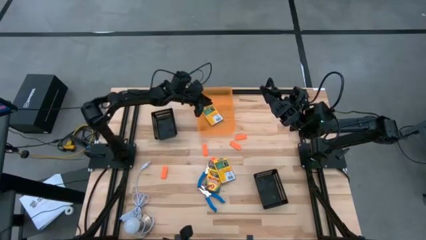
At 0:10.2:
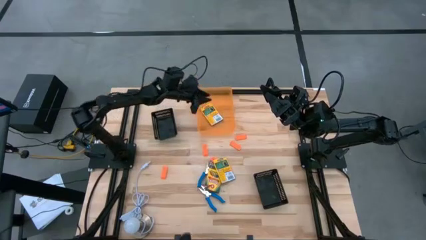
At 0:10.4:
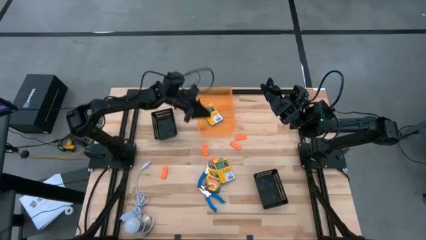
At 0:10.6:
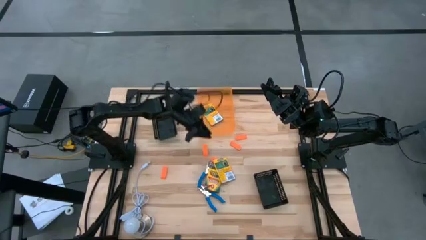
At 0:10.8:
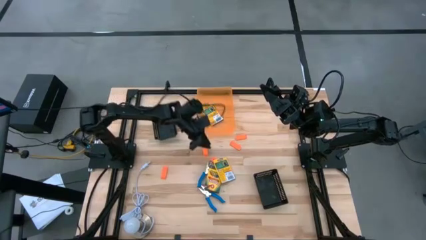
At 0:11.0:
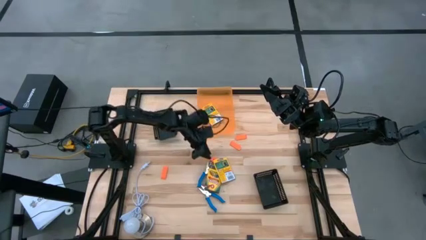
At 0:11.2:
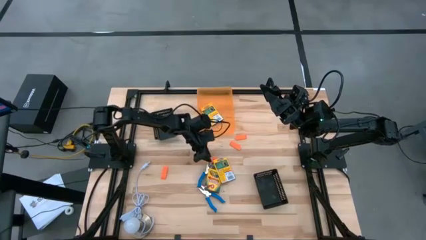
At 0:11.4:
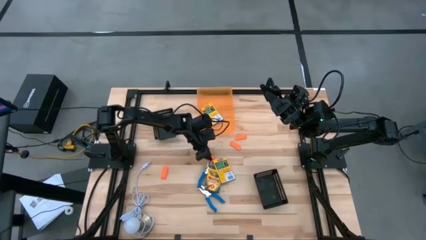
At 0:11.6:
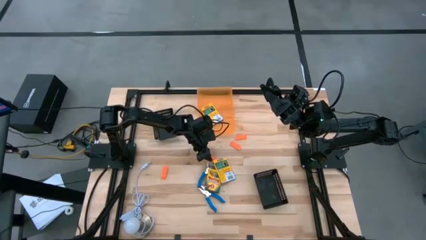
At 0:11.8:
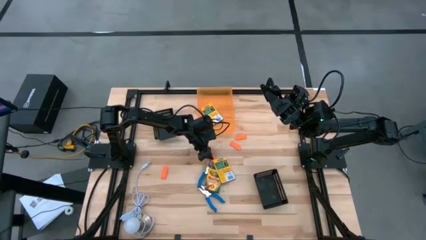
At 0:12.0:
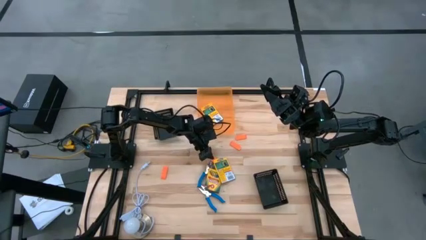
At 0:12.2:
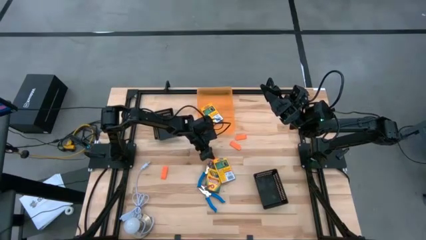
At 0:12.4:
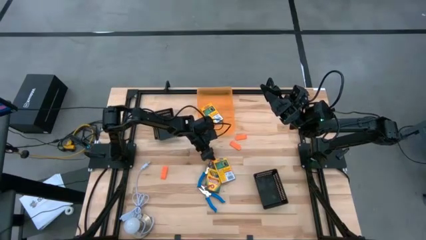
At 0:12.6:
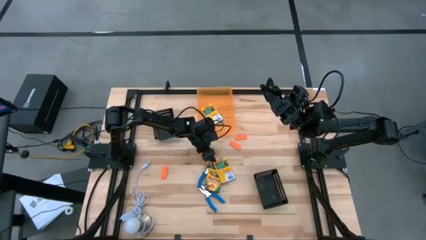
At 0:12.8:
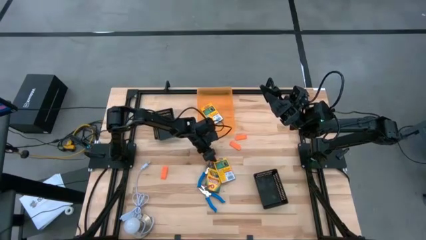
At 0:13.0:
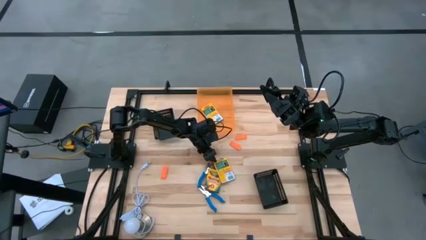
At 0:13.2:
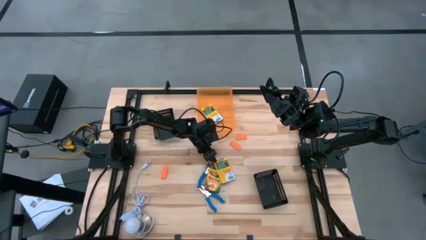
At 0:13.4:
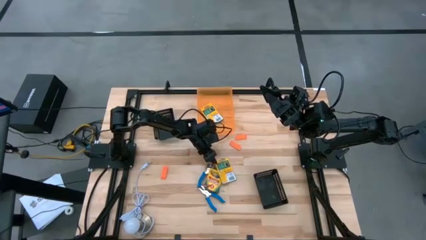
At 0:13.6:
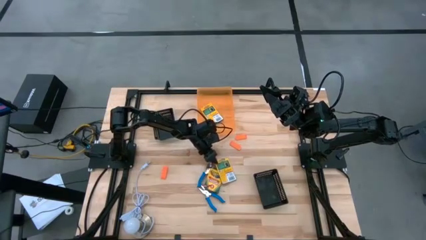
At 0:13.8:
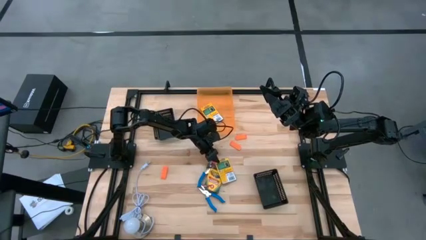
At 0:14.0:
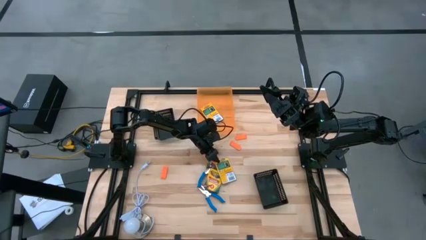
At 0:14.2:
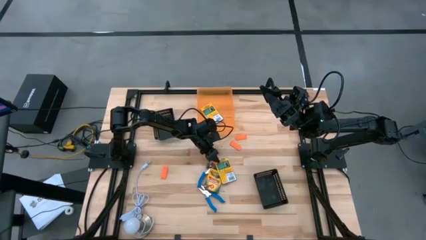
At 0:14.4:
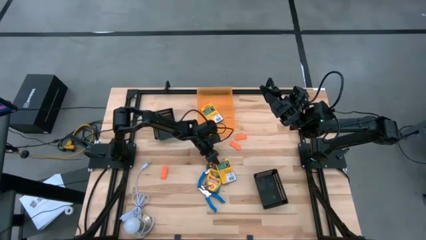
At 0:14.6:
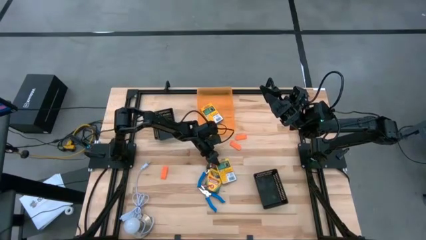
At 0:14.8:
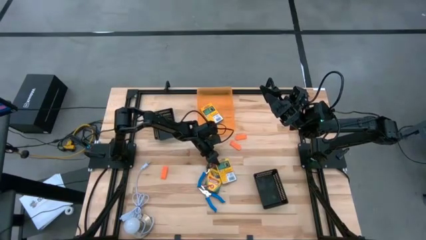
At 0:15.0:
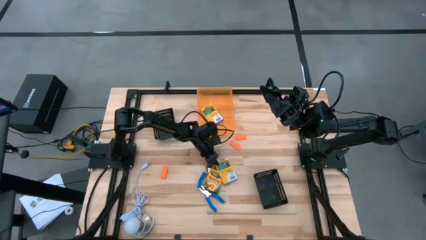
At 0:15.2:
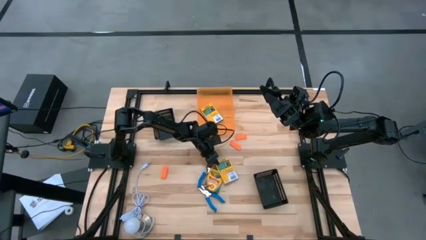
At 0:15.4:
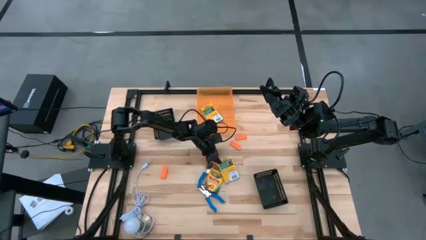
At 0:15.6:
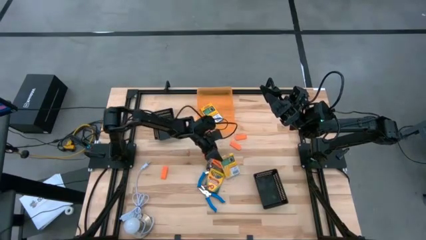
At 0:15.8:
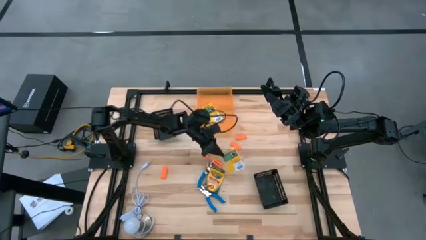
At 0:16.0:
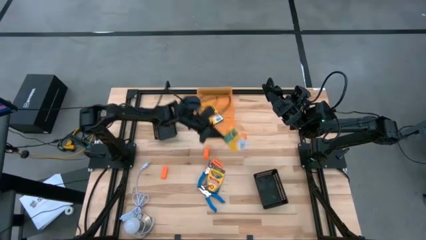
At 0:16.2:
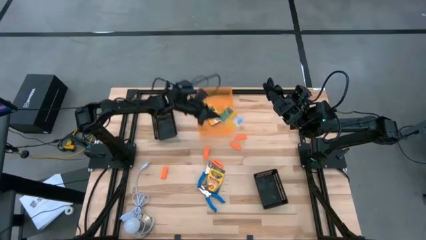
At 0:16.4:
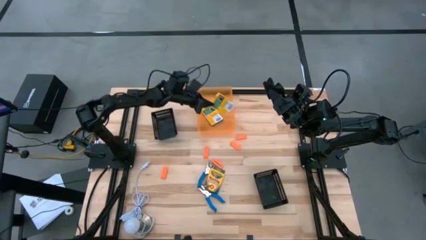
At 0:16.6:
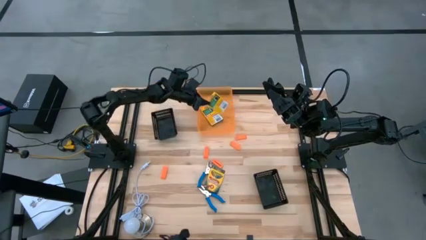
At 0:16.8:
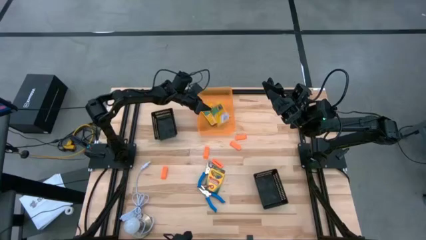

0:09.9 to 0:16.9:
Task: Pick & Place School Supplies
Put the top yellow crayon box into the orange bin

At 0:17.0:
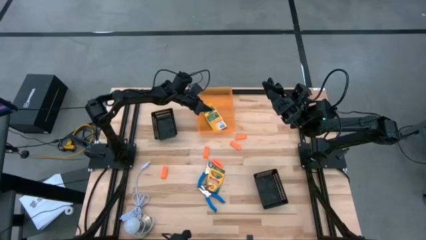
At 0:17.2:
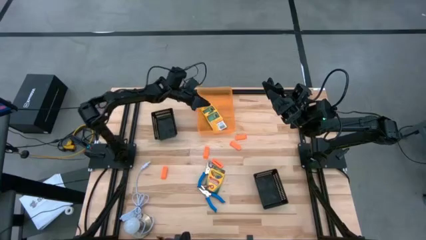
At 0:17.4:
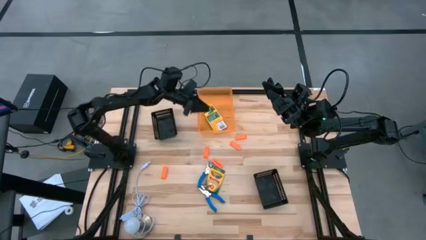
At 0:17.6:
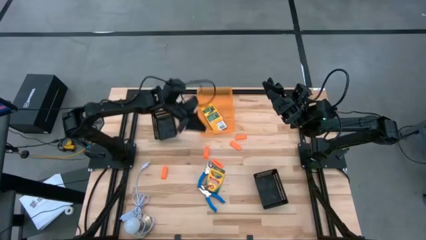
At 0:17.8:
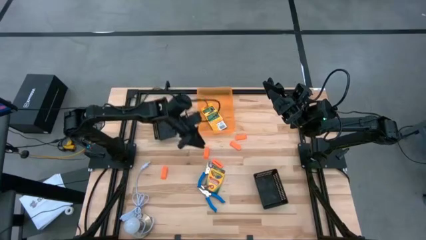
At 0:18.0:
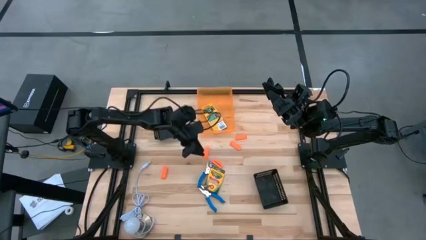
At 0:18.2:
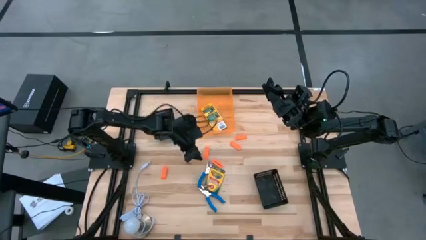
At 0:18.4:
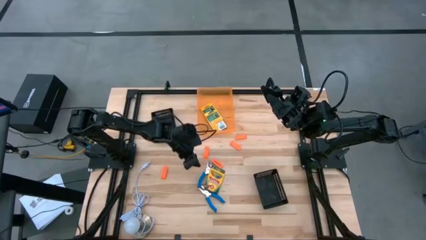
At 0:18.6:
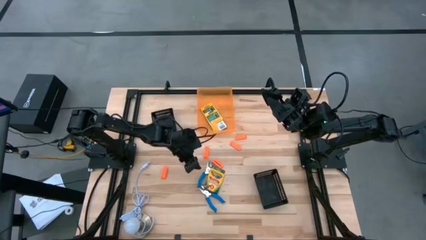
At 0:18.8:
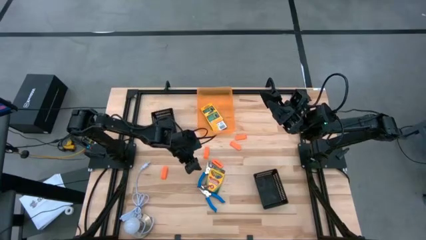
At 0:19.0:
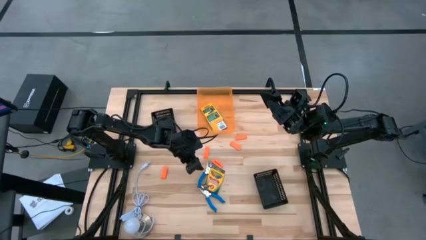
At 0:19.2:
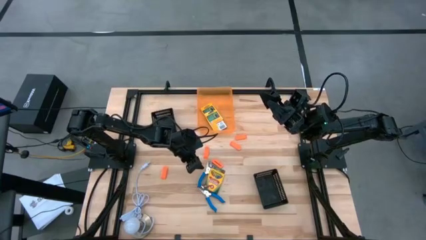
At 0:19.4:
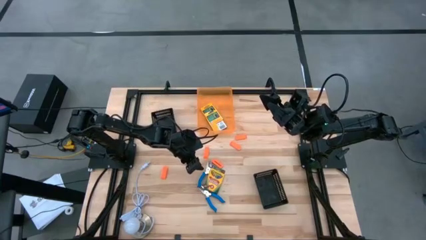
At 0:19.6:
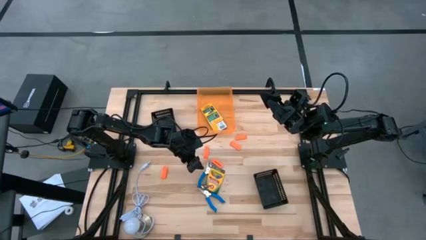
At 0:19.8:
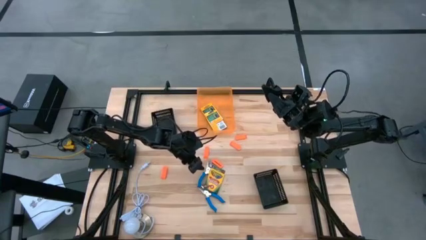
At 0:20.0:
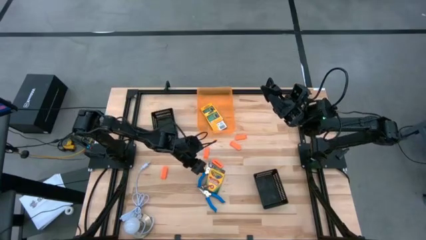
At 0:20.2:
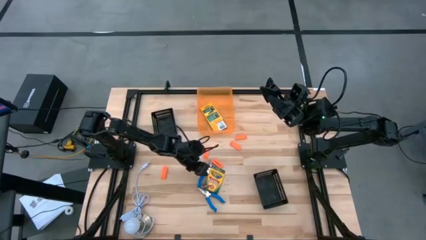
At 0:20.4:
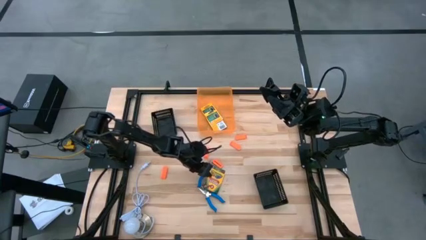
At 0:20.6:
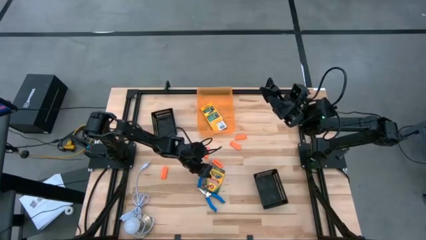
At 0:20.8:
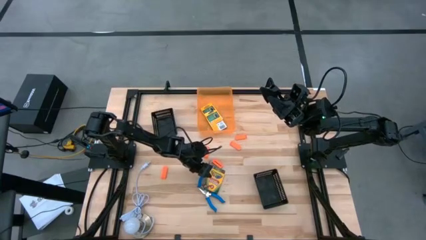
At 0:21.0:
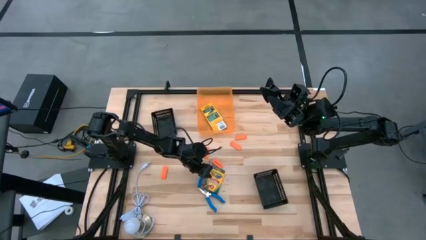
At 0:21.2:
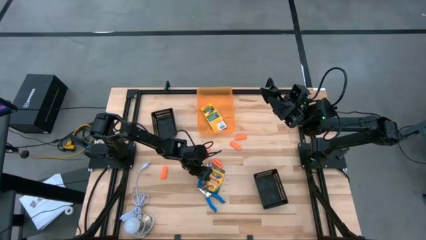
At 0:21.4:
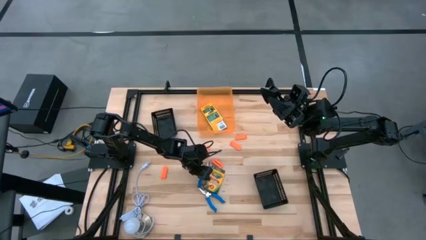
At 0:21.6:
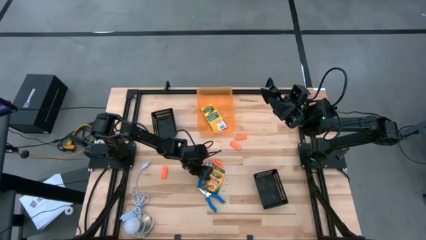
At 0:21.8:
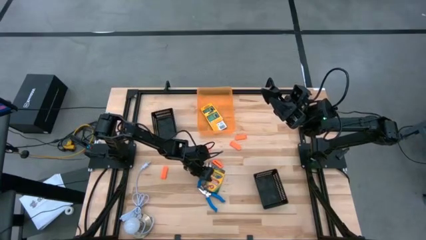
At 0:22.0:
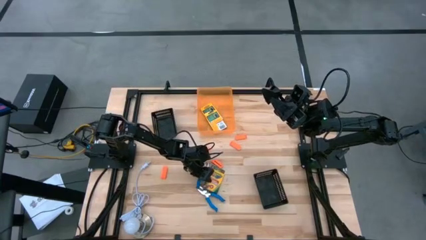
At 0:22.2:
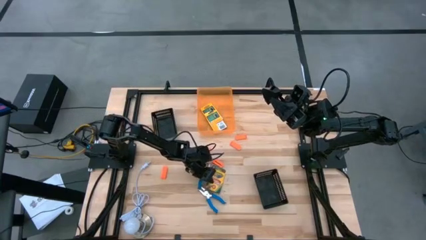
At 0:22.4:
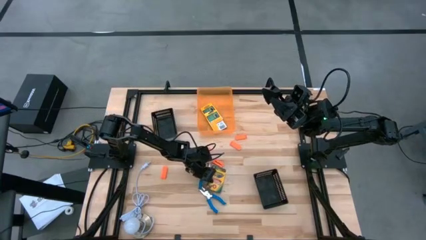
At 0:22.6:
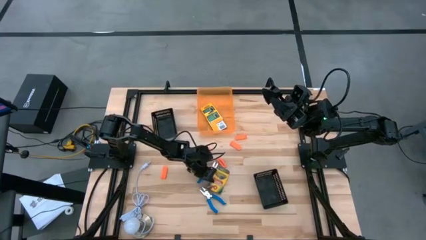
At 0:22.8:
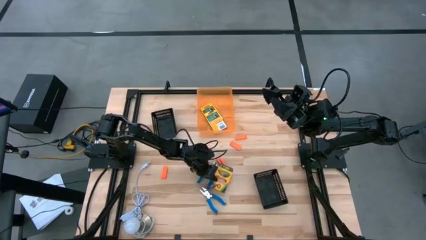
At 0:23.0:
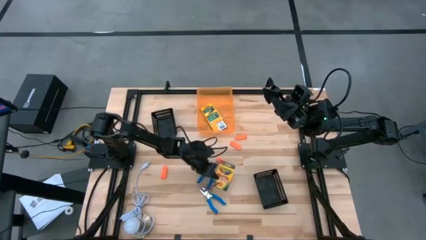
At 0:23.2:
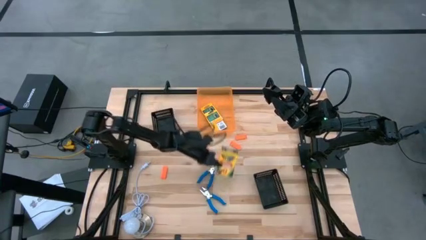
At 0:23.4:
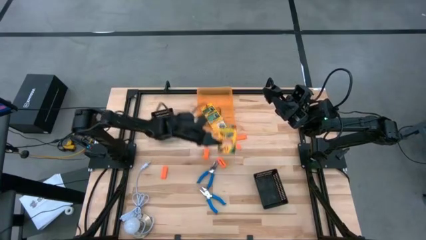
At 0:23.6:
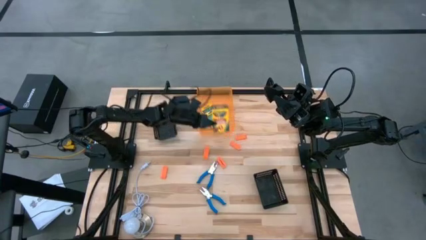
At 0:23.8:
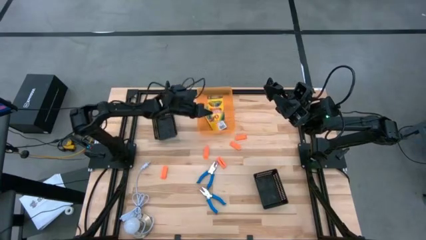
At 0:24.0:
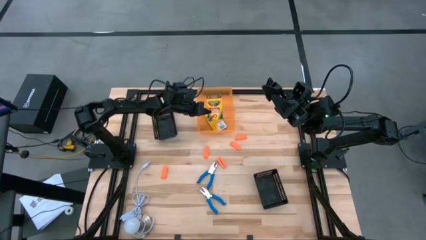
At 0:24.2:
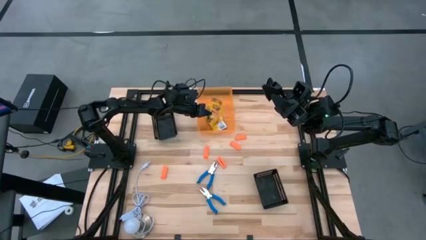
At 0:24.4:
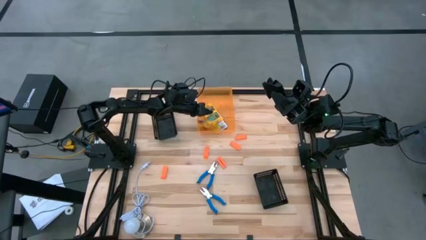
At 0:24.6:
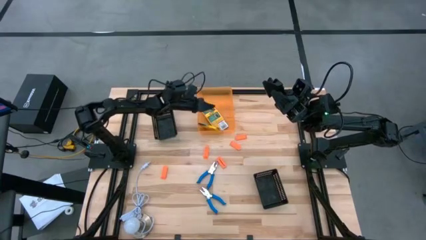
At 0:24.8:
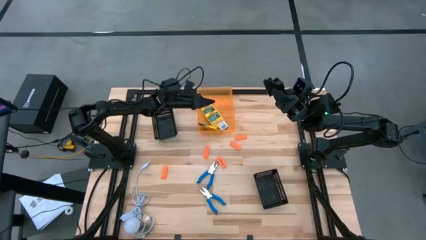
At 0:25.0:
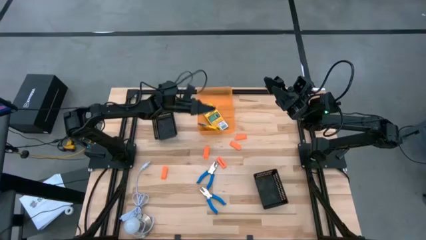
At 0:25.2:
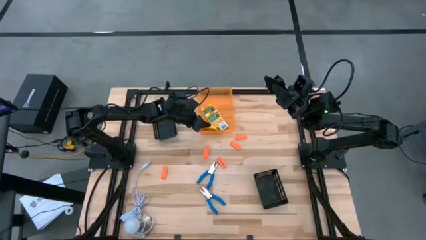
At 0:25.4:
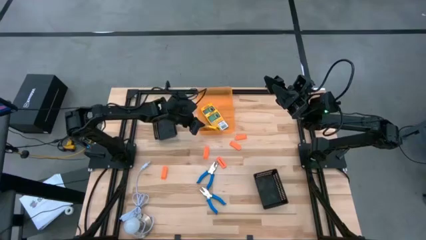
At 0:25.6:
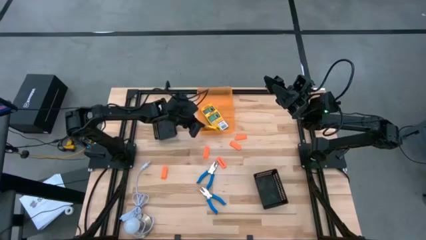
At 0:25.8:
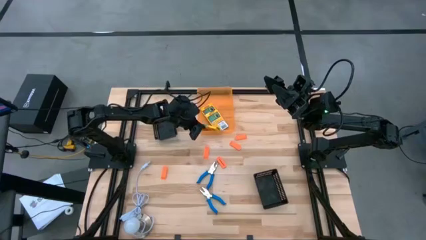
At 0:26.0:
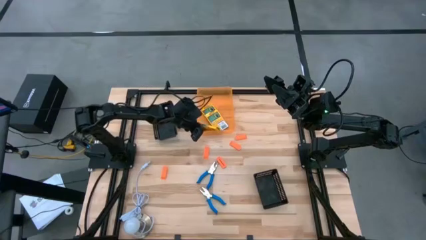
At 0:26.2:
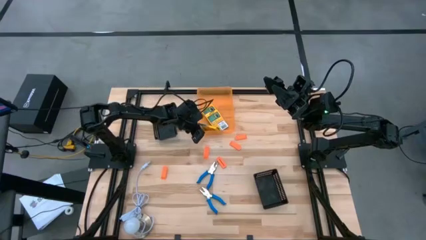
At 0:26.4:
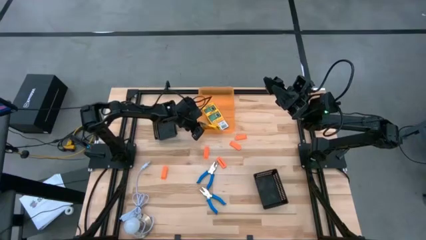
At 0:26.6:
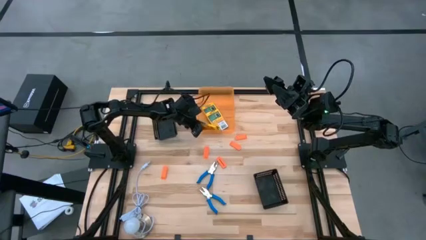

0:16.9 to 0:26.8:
Put the yellow crayon box into the orange bin
